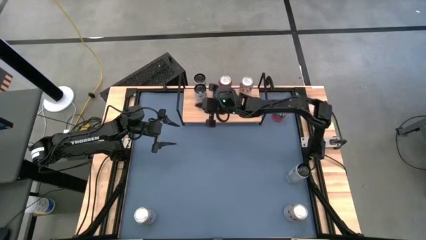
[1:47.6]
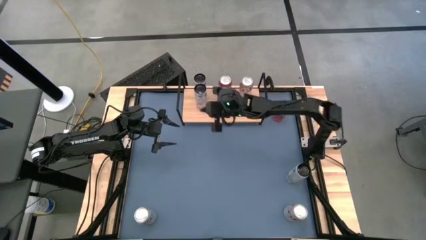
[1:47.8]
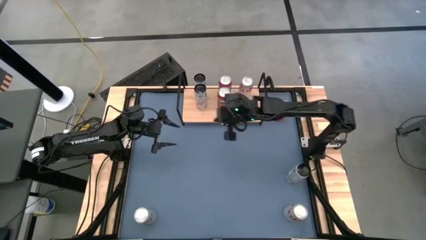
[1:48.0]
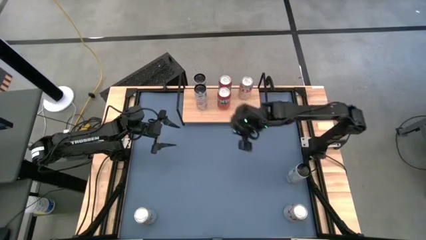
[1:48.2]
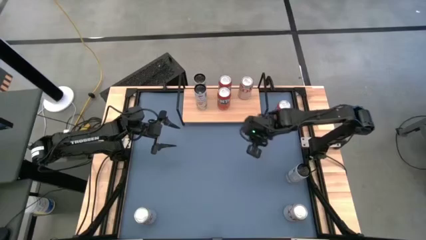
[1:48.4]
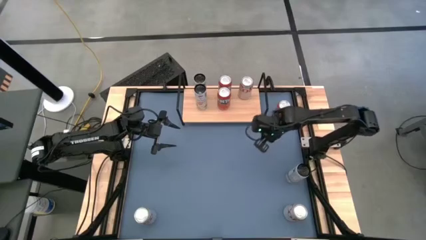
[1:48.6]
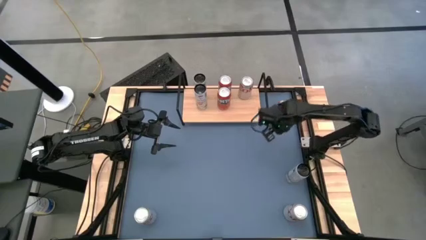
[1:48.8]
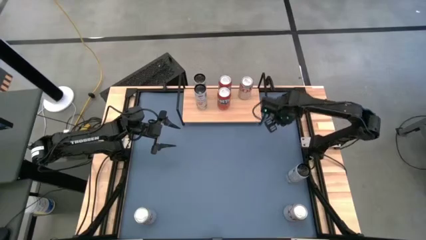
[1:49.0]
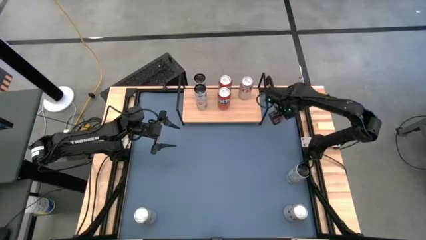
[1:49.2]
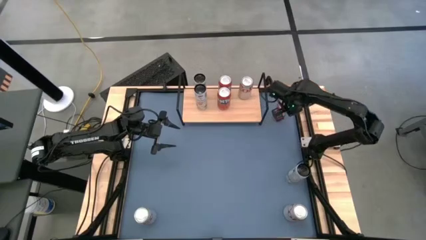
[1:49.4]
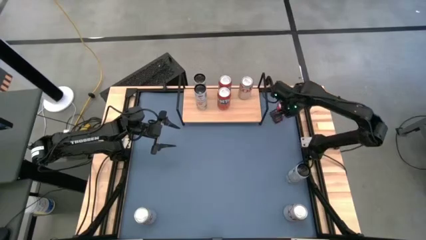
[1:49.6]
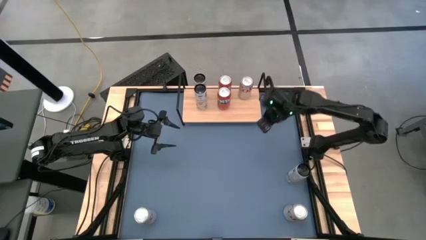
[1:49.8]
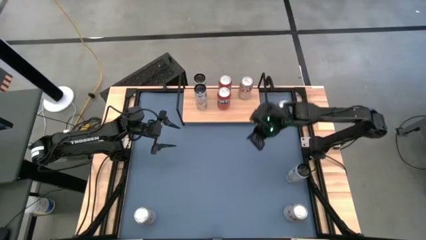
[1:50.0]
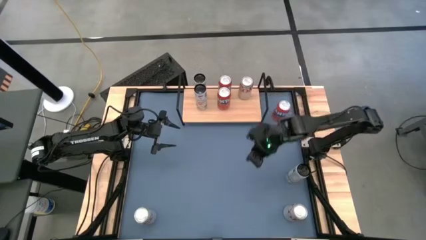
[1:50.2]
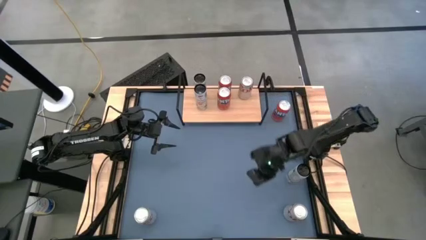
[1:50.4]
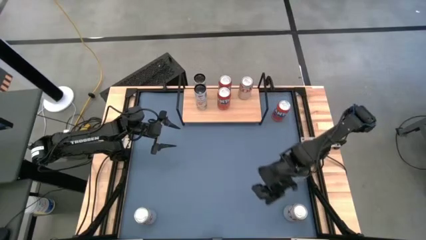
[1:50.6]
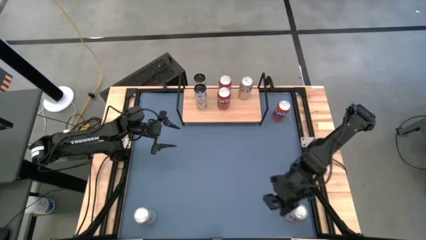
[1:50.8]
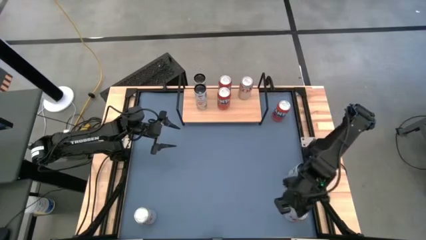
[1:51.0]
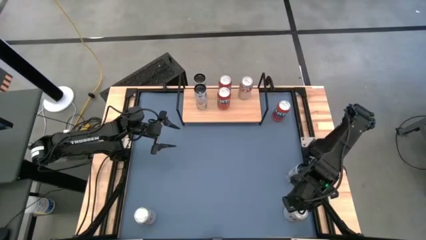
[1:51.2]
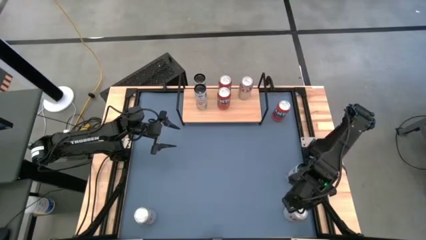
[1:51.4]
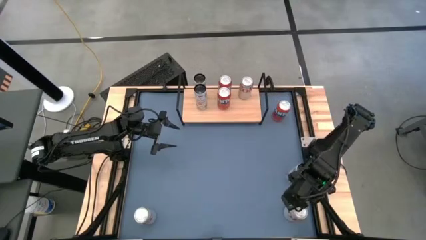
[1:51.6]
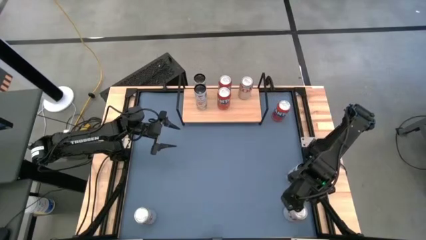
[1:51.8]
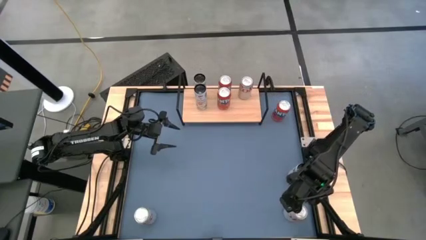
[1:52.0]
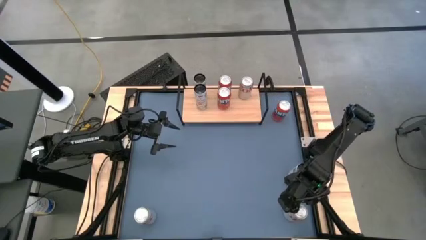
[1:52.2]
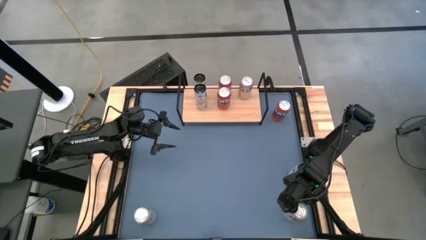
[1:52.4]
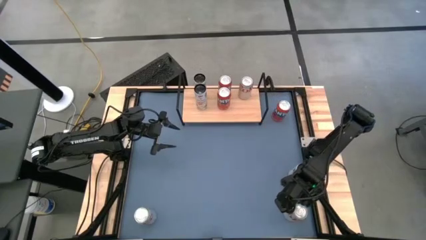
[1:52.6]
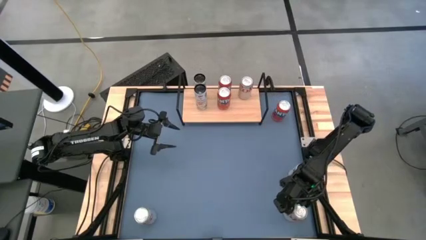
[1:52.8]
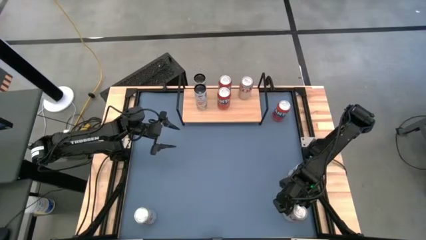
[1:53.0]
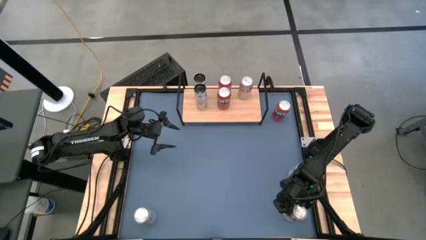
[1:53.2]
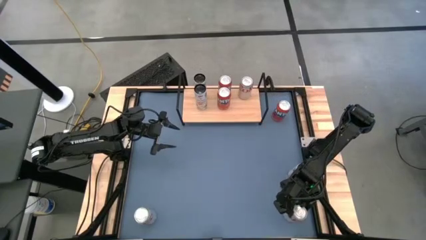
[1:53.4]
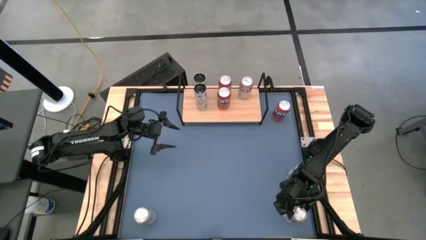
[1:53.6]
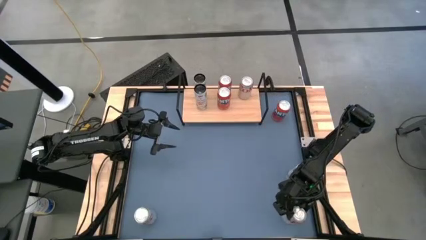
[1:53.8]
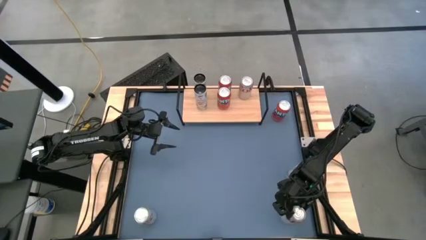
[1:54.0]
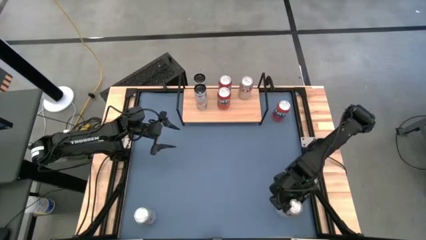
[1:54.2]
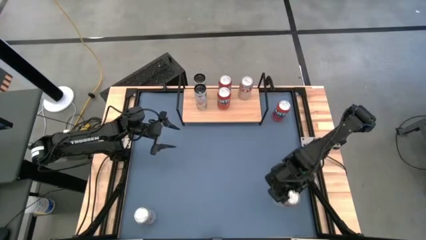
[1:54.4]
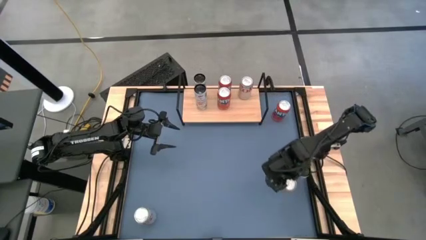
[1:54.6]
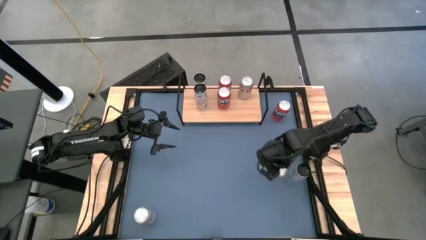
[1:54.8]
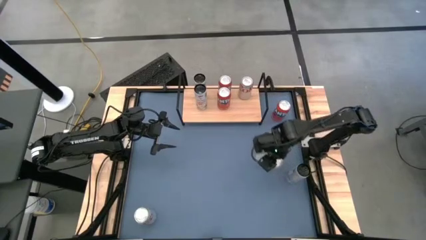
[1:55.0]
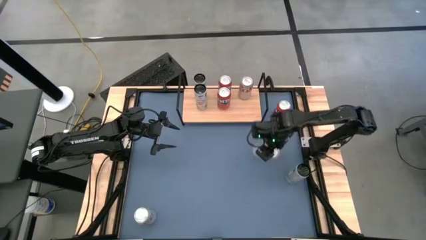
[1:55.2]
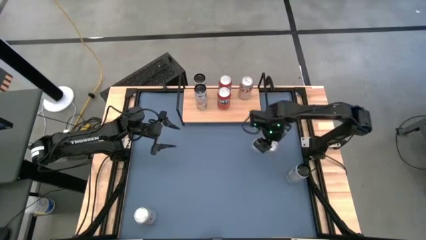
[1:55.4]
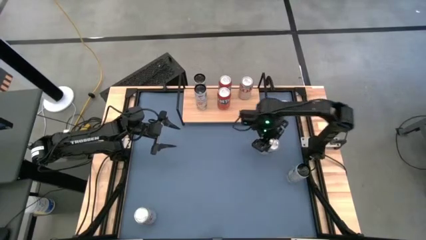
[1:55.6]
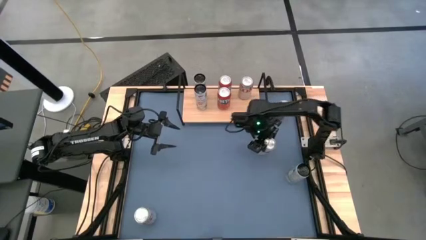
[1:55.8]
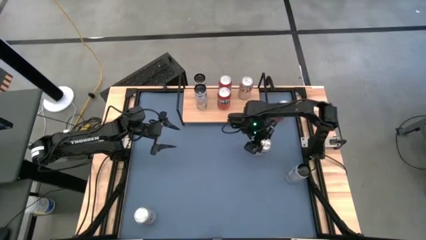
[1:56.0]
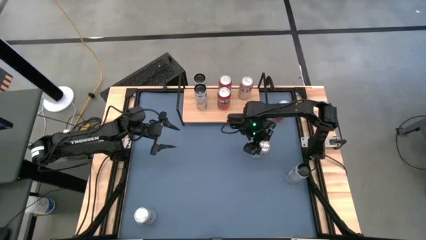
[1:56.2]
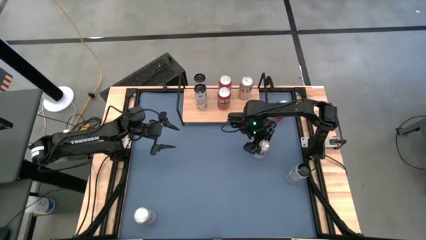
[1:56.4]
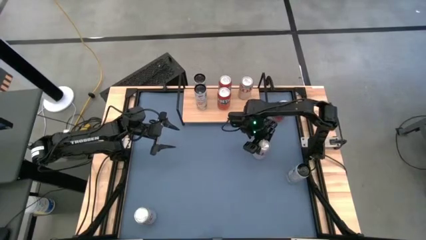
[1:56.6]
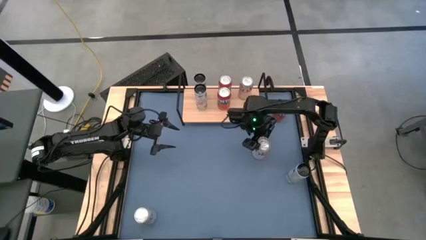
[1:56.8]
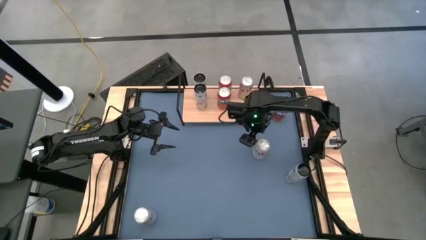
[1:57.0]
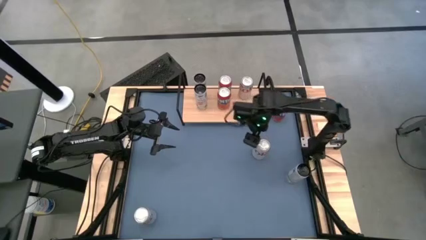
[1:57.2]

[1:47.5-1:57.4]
Task: Place canned beverage on shelf
Put the right silver soda can on the shelf aligned with the other silver soda can

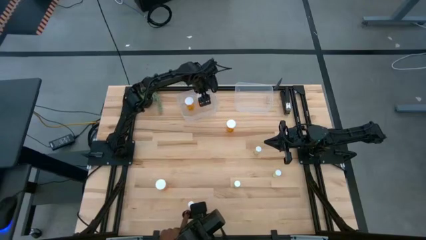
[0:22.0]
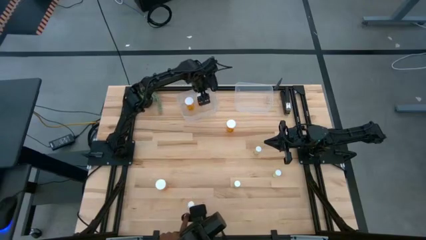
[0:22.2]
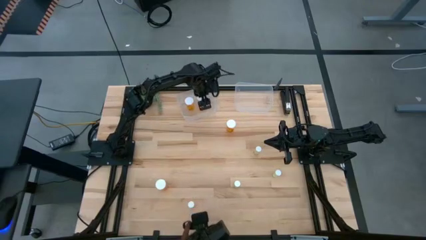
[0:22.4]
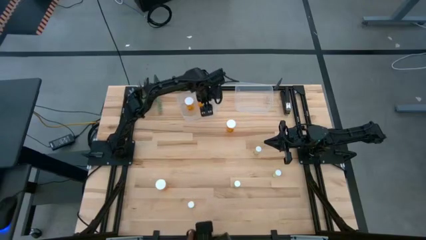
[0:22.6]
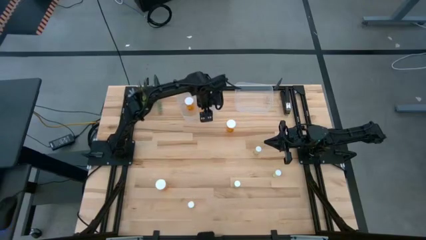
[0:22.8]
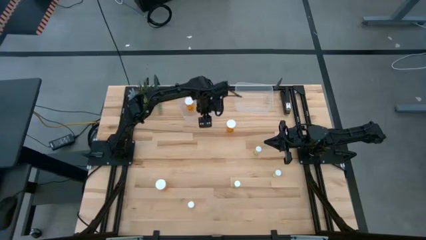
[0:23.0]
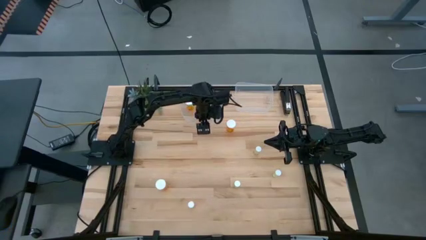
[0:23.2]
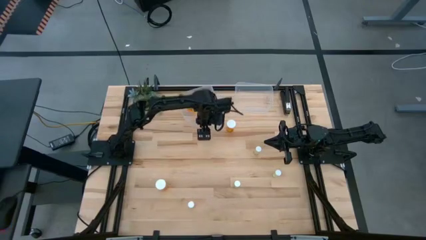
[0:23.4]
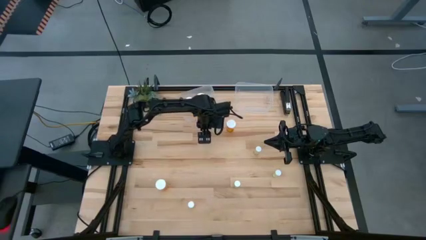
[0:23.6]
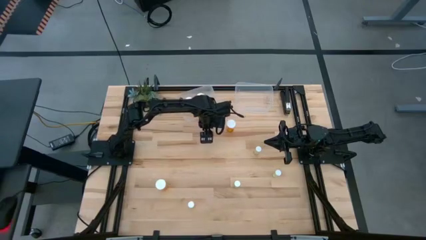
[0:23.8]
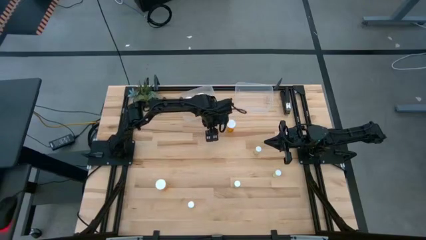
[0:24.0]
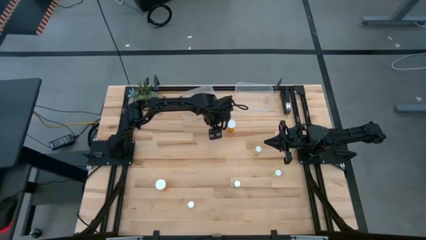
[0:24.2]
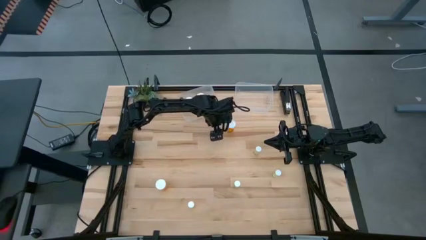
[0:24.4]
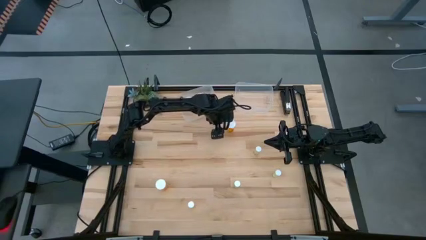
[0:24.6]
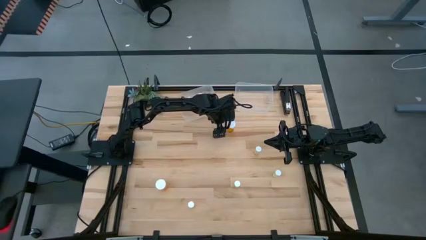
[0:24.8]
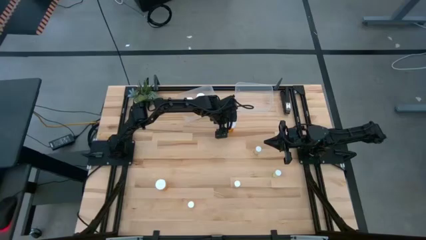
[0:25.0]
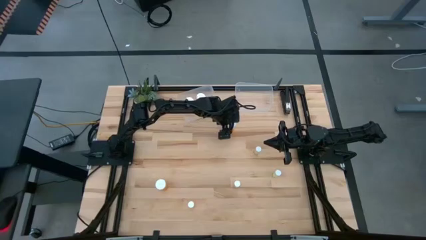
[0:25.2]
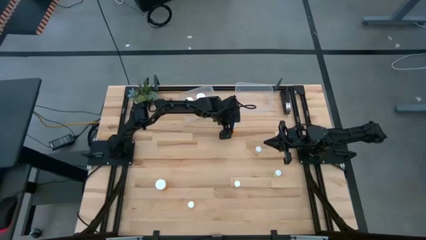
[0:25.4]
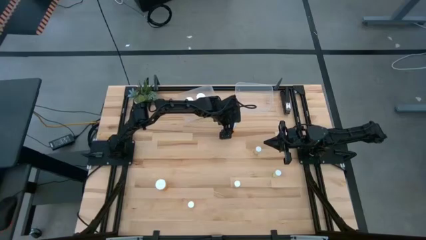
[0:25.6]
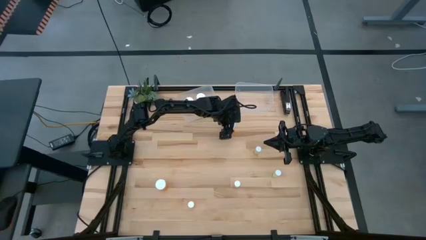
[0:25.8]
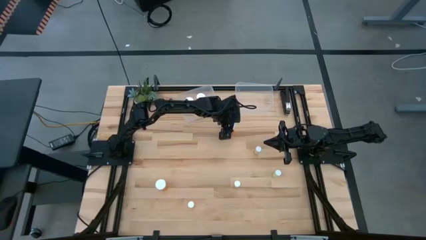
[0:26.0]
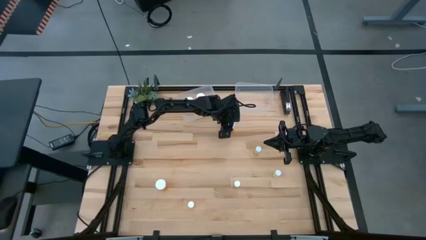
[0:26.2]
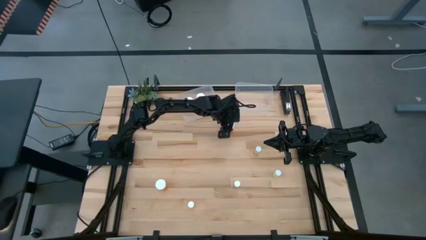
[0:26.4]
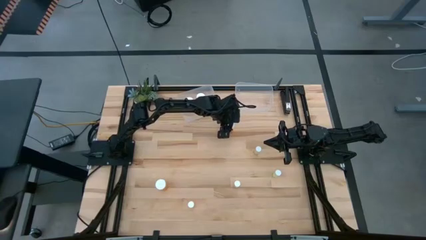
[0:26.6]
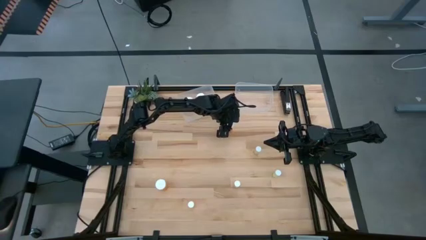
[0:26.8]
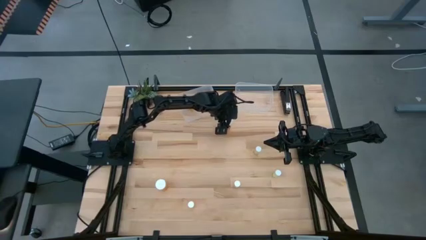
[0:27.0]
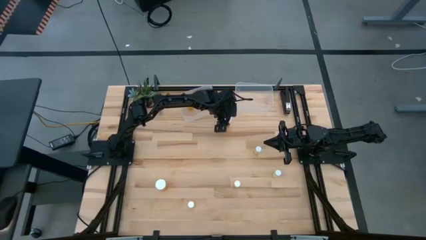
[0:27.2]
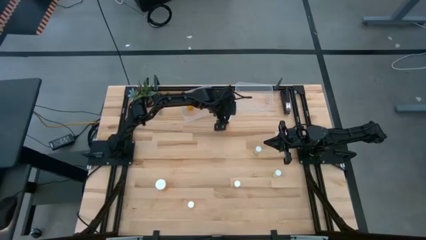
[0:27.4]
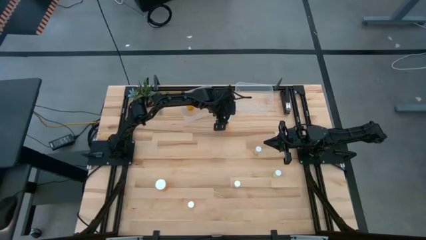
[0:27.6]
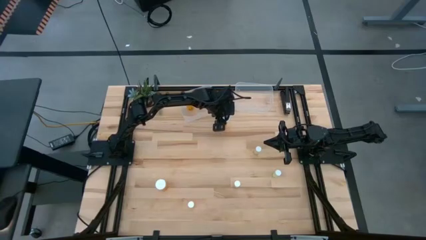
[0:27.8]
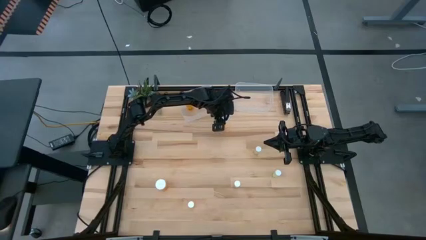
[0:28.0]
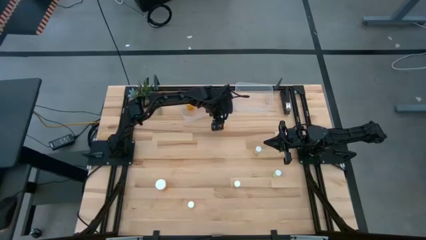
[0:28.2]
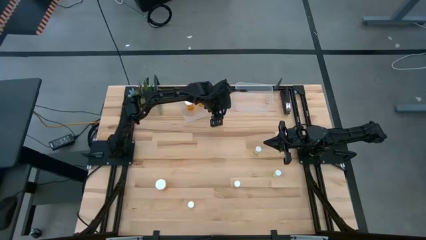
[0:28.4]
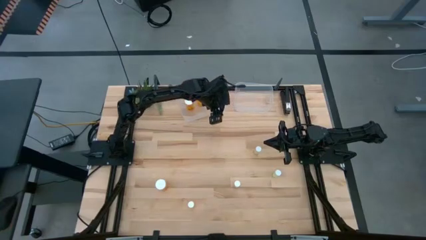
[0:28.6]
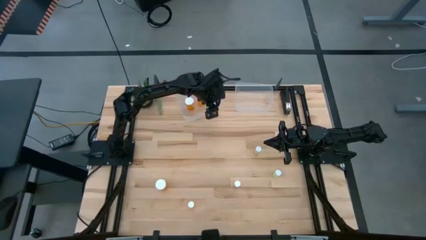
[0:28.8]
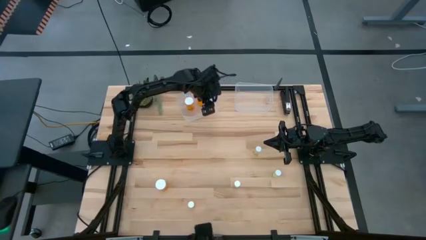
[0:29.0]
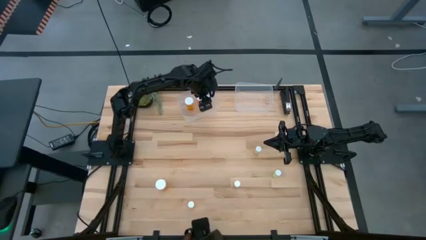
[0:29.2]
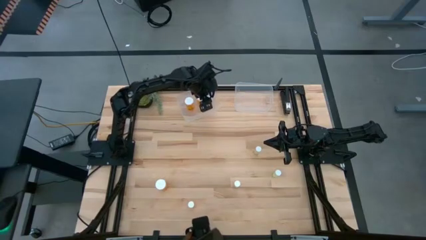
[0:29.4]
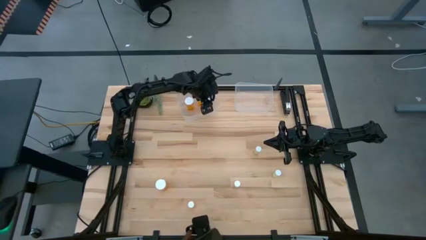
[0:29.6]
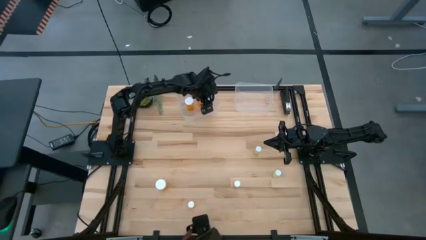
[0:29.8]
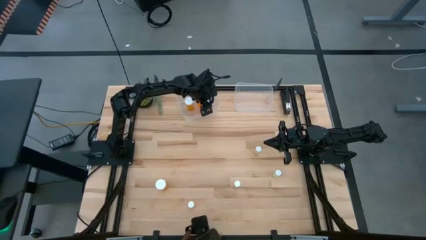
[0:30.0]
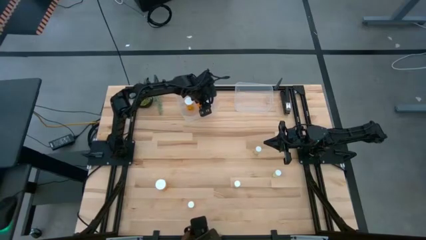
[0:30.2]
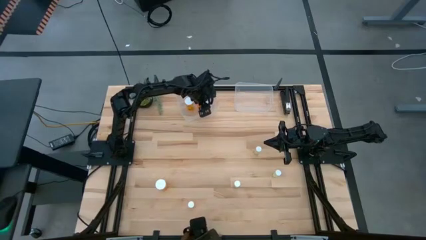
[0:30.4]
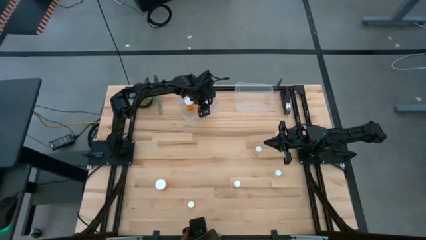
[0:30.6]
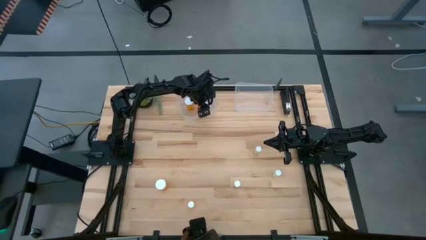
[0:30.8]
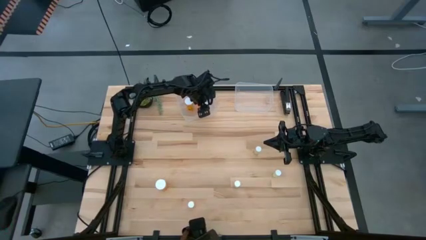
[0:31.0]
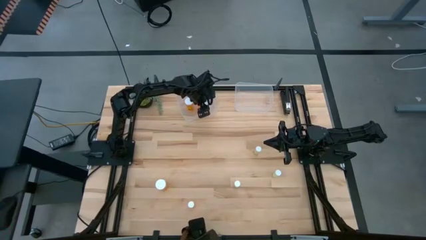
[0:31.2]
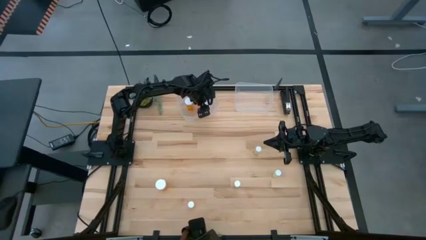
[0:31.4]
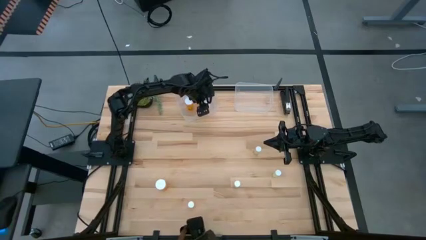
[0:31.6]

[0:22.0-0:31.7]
Task: Pick and place medicine bottles into bin by pill shape (circle, oval)
Put the orange capsule bottle into the left transparent bin
